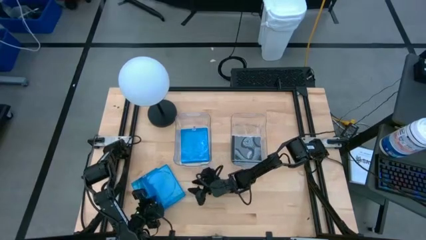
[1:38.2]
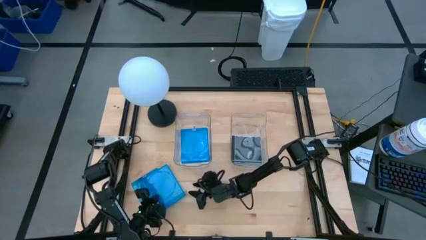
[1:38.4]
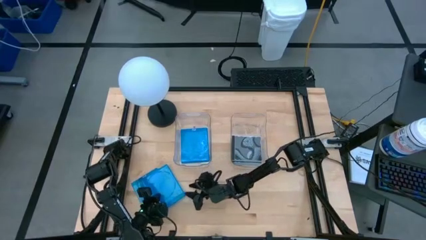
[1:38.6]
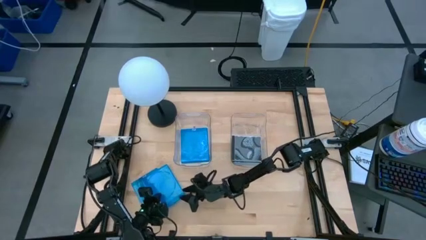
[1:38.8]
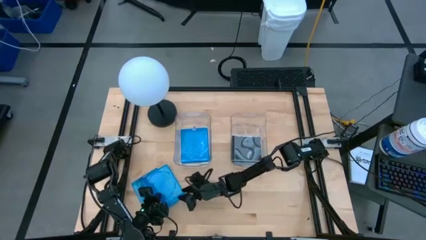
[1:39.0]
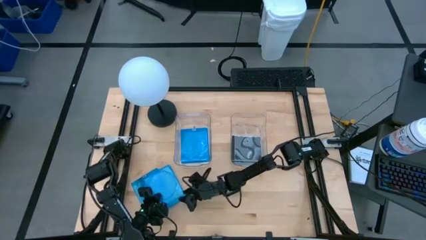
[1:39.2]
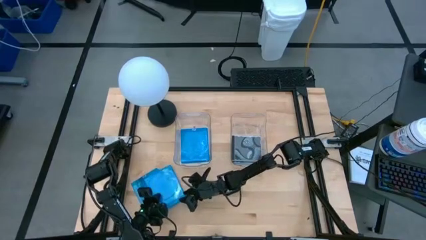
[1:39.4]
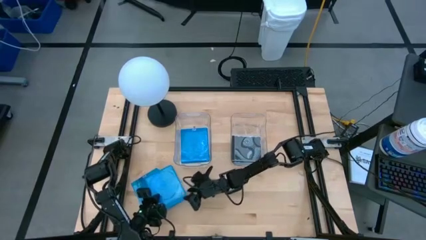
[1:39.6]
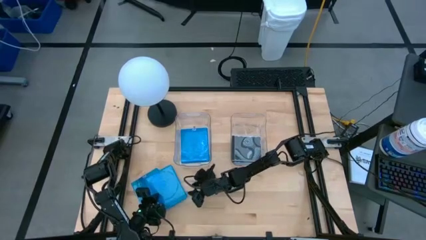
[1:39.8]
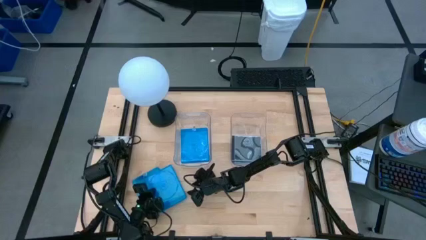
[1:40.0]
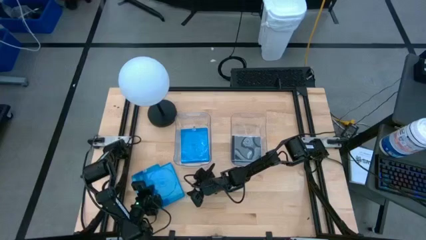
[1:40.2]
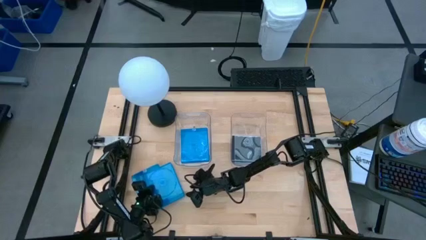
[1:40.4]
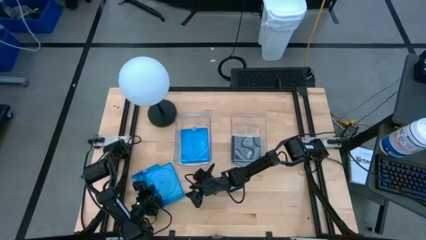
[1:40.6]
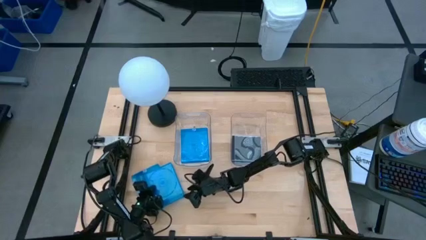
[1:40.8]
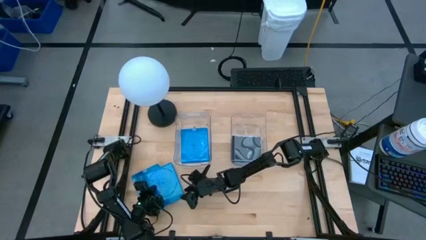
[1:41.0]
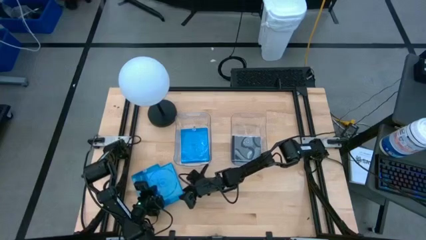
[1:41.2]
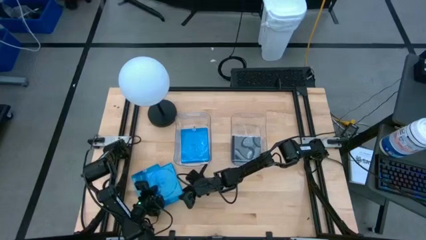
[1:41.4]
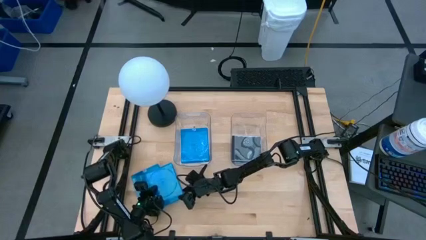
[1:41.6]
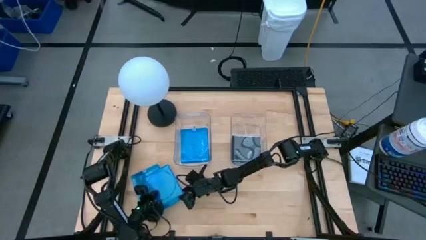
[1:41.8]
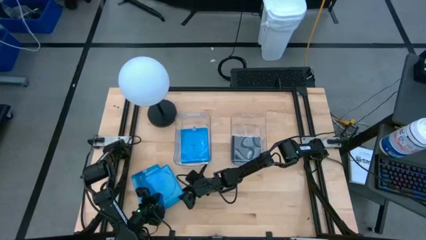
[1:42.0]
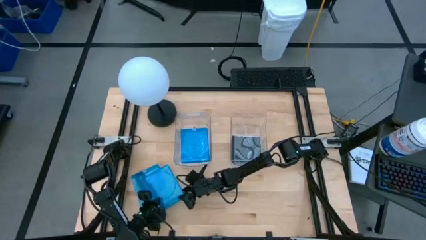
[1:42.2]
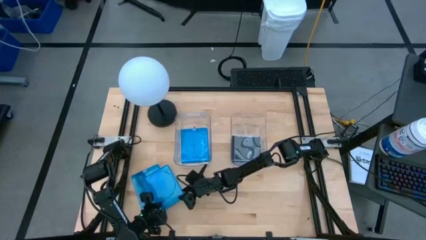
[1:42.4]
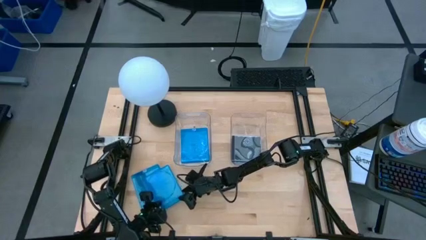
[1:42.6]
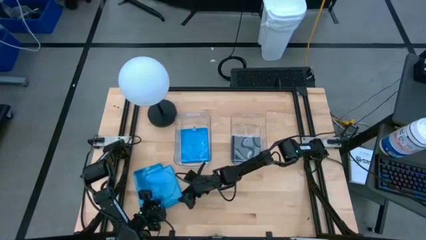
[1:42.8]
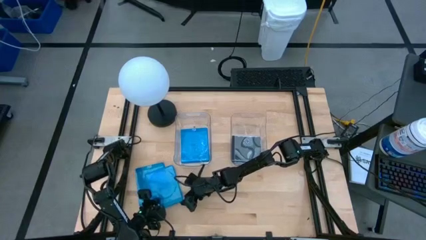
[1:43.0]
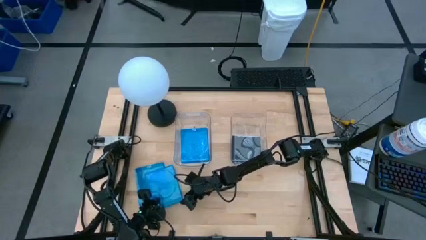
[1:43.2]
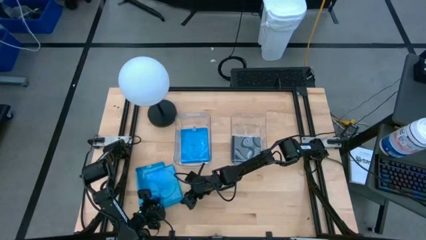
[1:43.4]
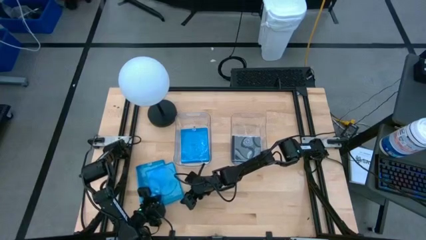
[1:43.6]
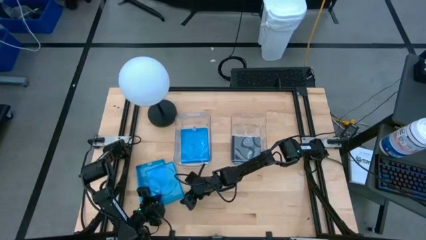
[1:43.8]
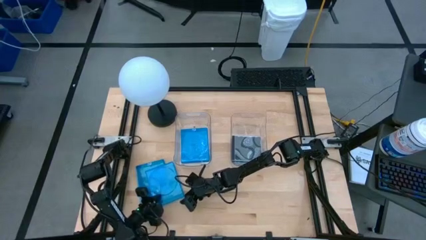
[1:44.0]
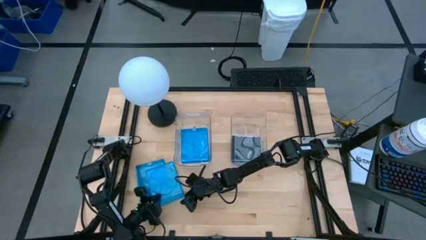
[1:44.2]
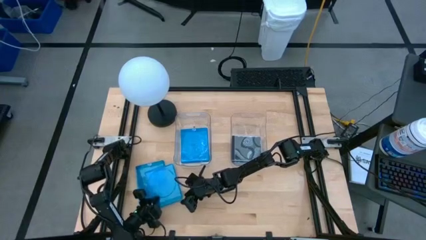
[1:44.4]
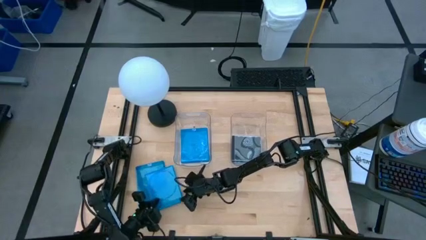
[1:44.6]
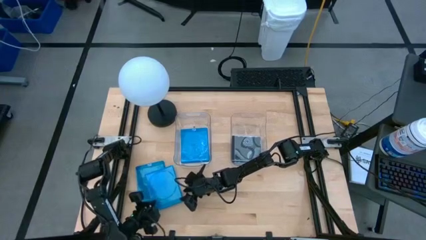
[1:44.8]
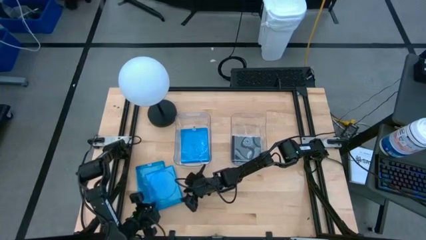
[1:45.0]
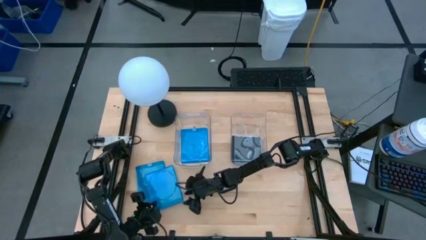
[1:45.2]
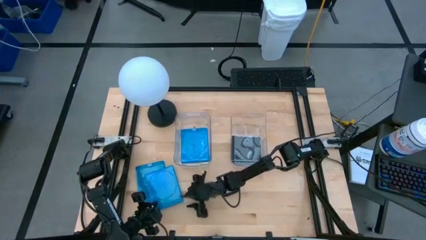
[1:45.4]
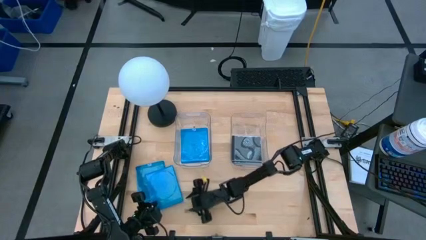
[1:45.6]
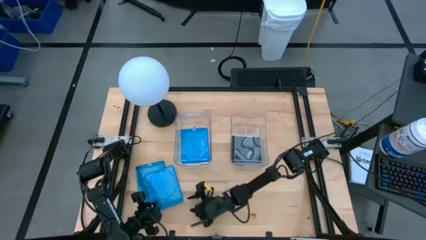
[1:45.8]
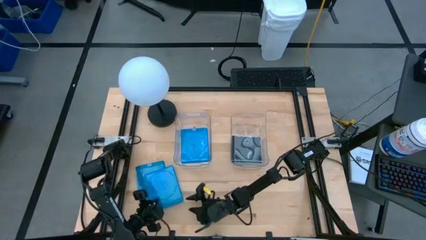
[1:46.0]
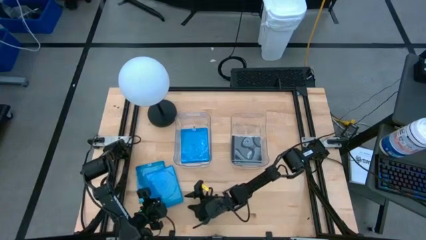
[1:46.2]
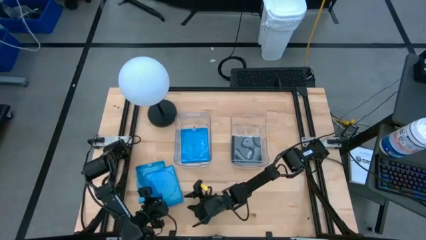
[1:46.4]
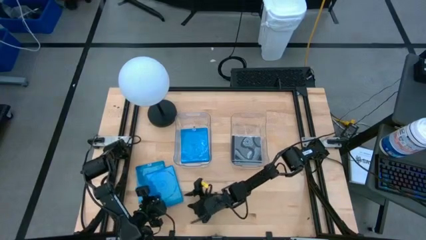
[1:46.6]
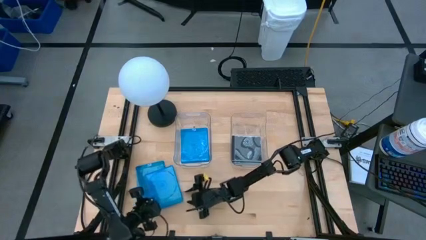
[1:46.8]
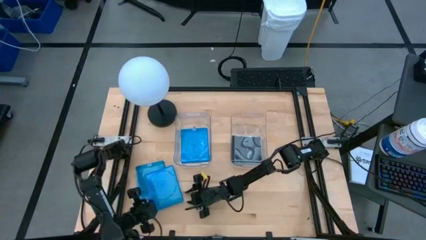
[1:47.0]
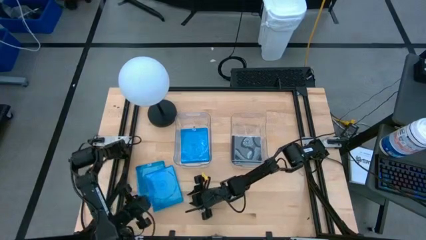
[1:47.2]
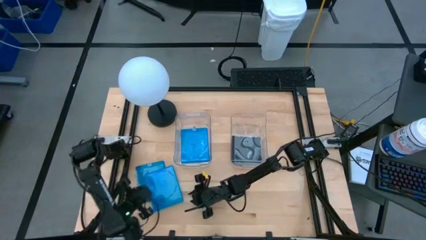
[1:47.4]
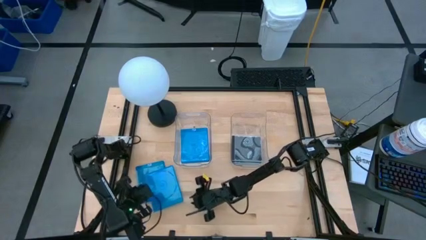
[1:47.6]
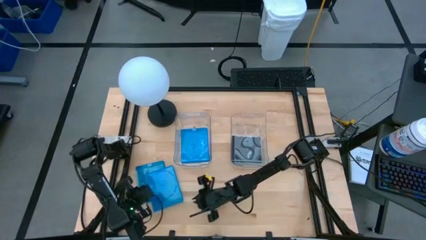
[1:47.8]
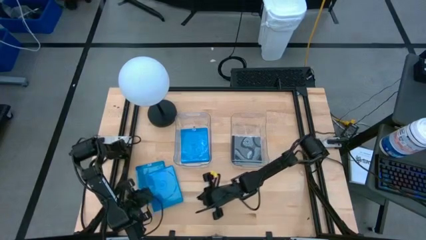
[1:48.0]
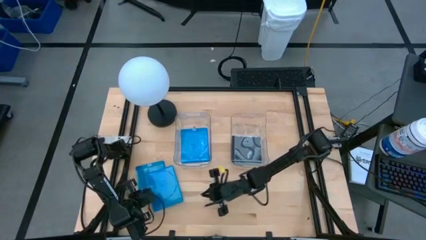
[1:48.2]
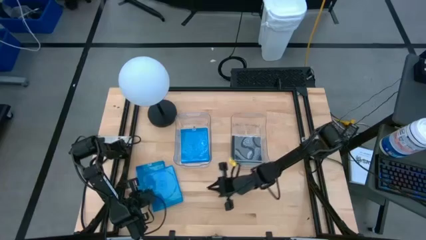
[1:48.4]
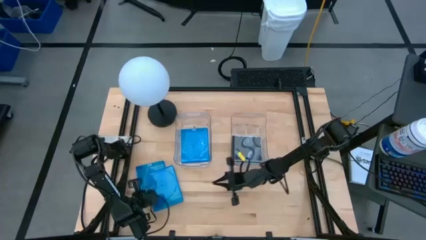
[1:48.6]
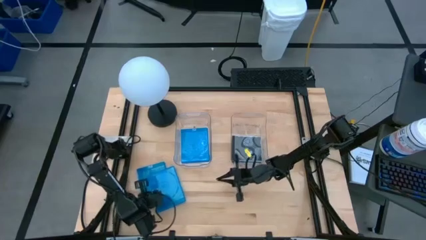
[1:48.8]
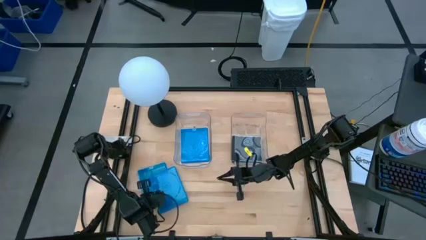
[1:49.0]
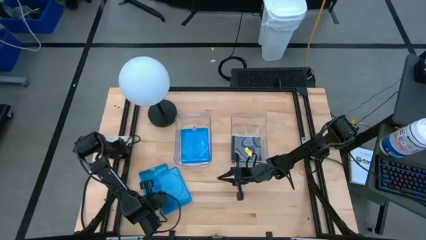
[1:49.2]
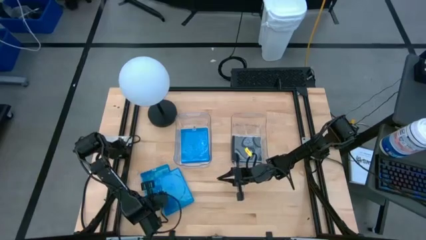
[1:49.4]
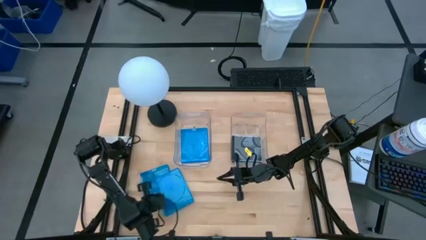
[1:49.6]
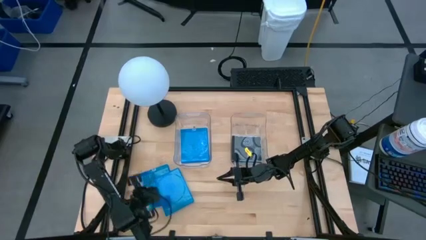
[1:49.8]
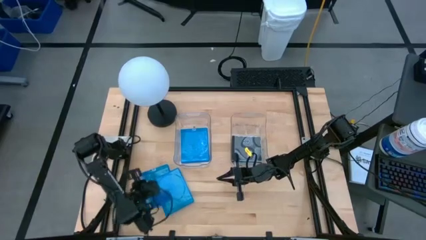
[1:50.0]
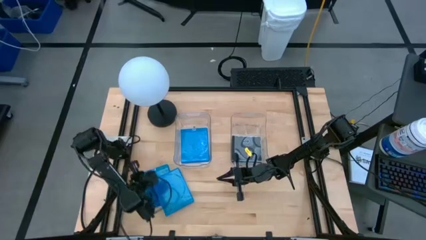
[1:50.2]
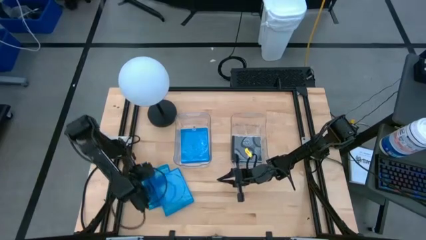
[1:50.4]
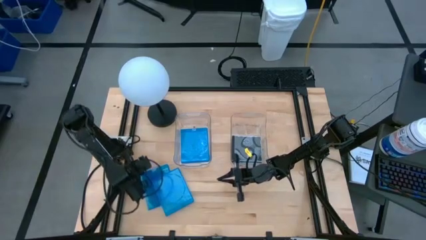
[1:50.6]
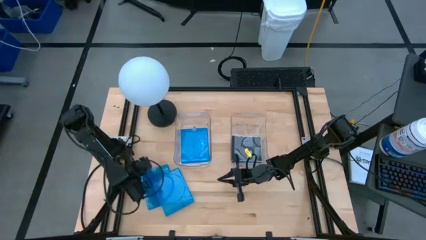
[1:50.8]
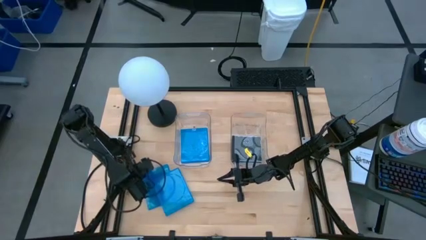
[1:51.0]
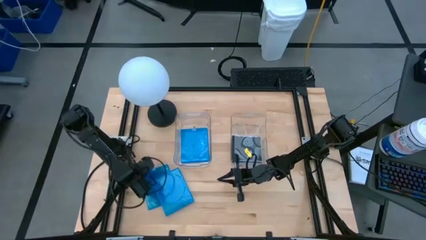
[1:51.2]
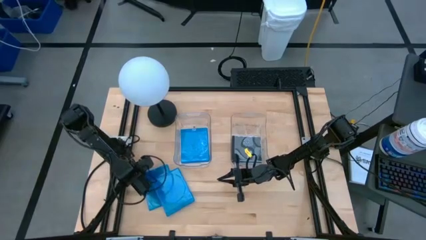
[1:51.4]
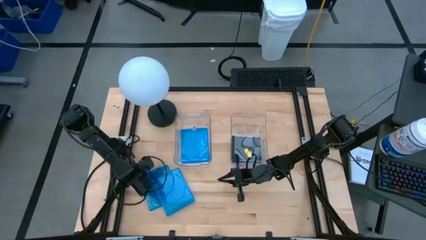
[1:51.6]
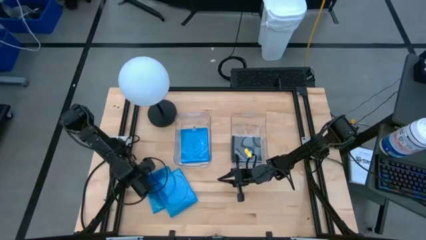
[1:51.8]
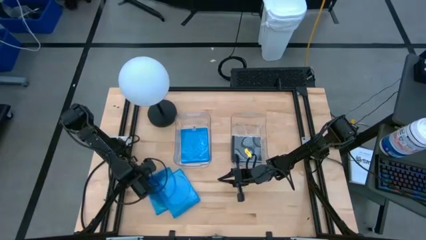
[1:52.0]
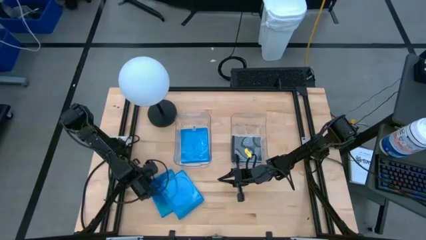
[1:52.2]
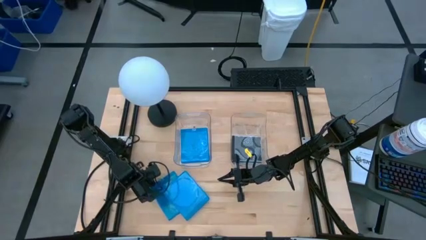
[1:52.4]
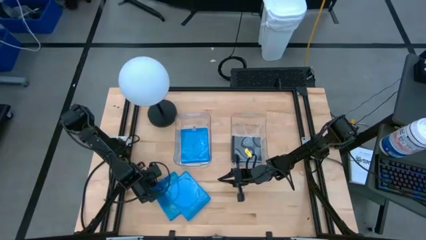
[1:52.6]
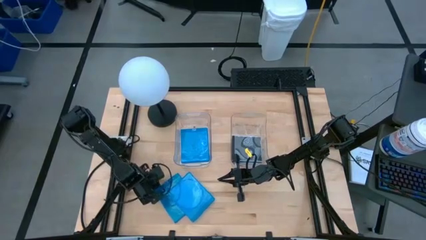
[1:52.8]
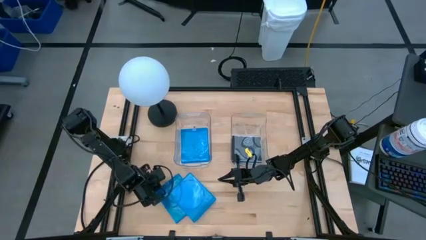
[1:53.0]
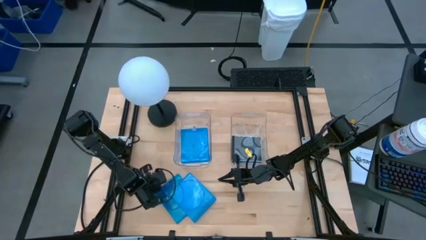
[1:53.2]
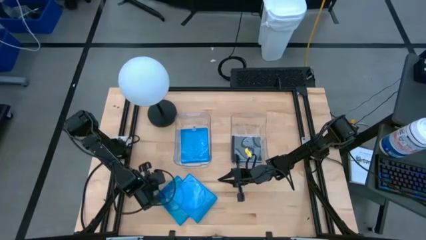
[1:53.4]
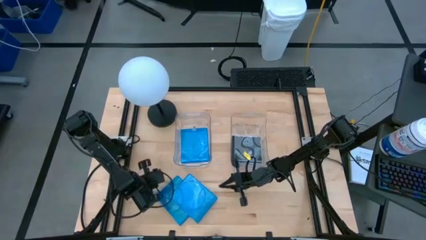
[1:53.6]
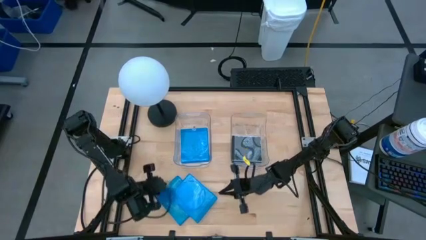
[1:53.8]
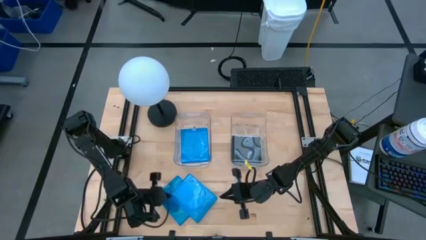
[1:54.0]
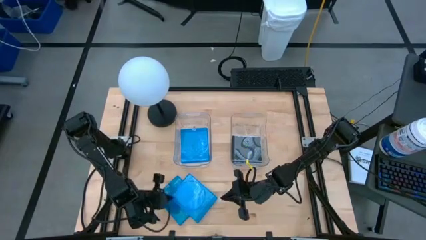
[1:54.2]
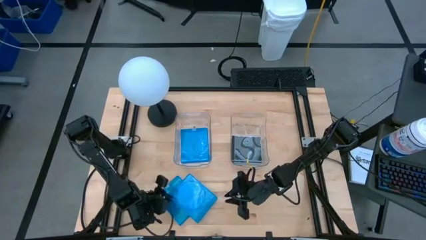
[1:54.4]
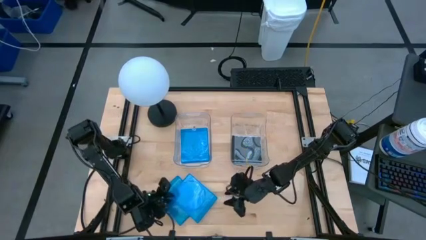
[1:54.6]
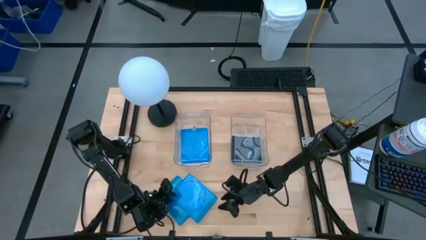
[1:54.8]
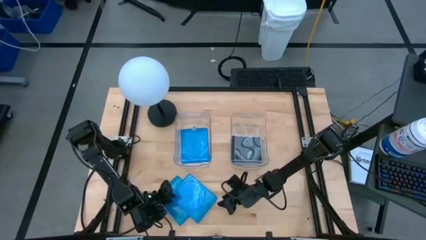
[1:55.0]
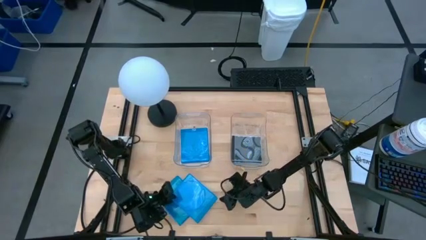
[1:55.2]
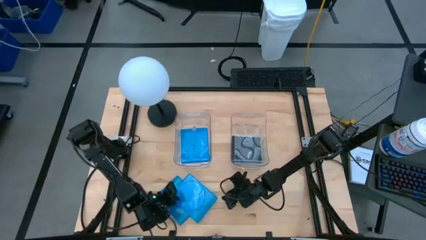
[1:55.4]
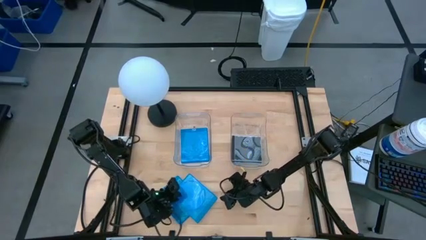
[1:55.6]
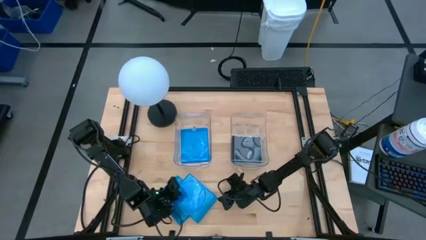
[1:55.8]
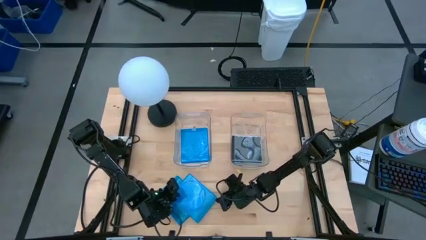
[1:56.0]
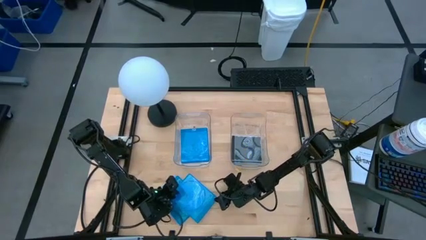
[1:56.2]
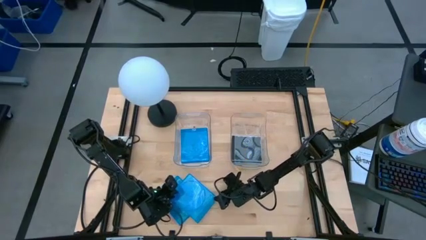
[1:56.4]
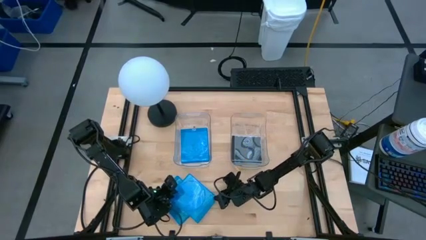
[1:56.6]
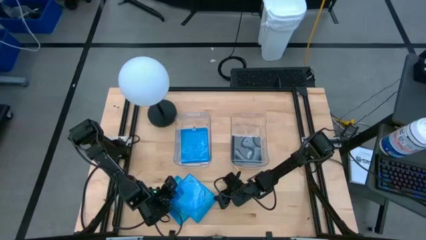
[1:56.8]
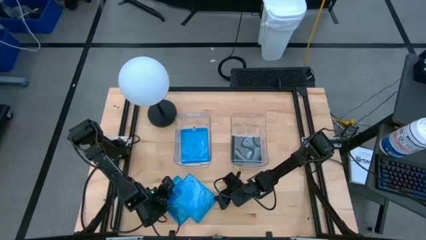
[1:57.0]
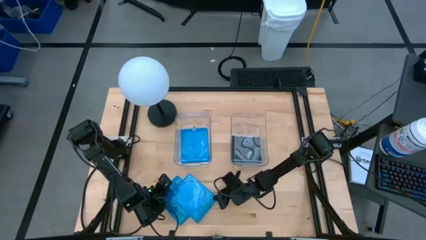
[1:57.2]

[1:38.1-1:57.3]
Task: Pick & place jewel cases by type
Put the blue CD case into the left transparent bin
